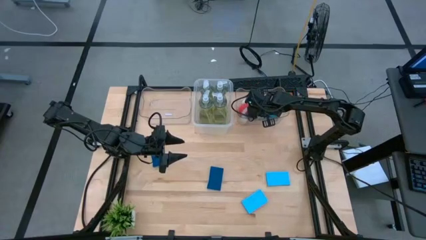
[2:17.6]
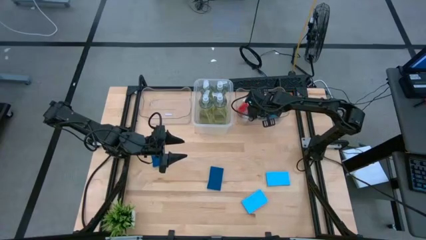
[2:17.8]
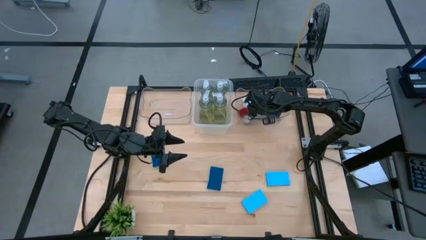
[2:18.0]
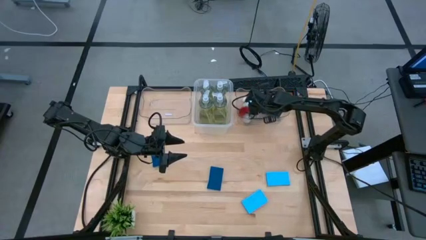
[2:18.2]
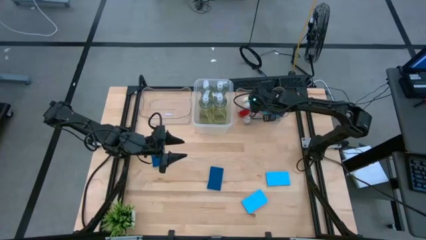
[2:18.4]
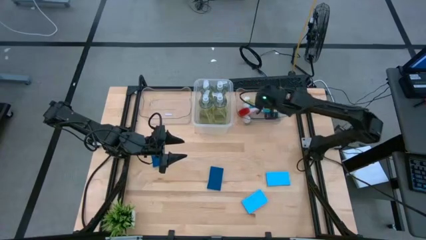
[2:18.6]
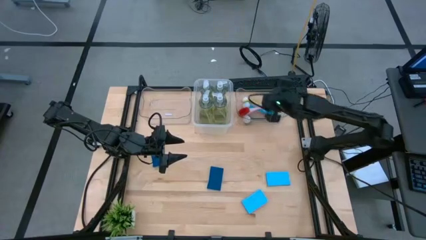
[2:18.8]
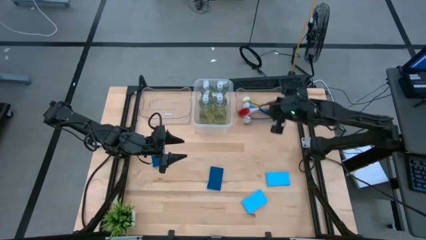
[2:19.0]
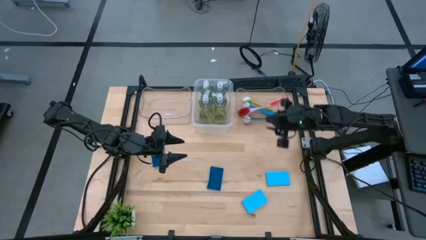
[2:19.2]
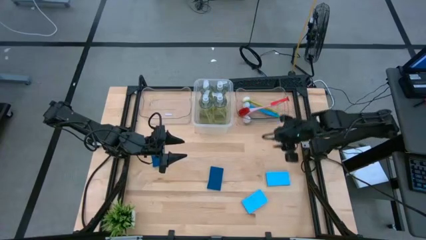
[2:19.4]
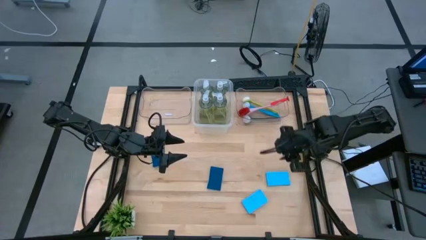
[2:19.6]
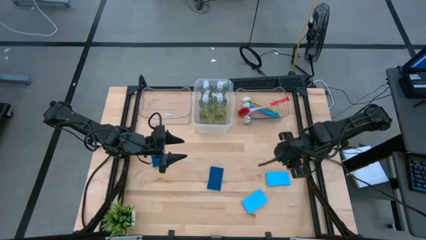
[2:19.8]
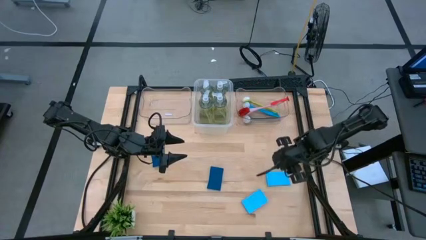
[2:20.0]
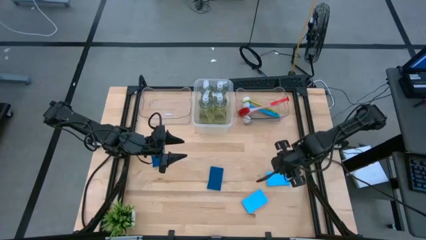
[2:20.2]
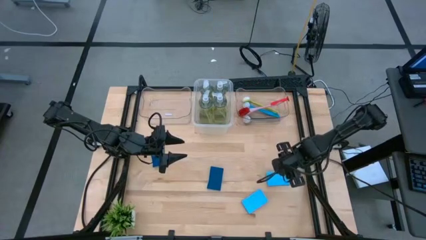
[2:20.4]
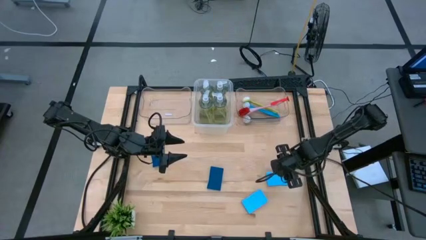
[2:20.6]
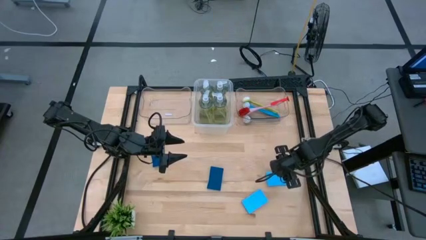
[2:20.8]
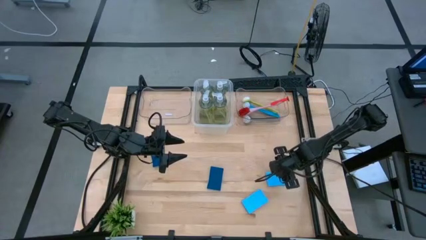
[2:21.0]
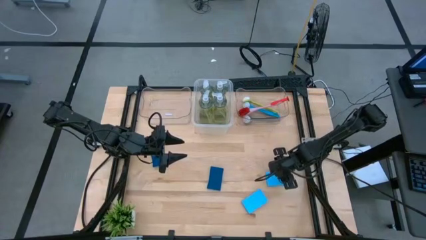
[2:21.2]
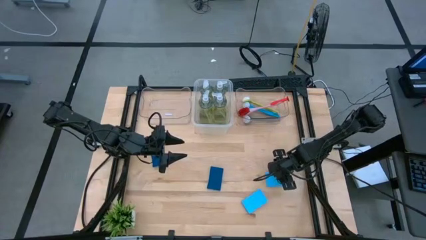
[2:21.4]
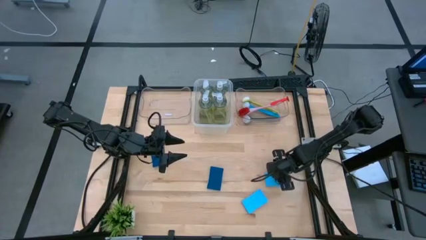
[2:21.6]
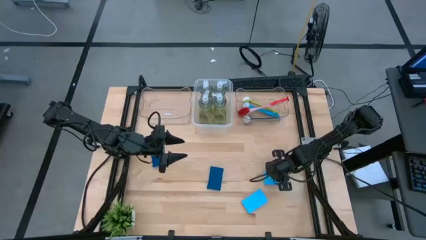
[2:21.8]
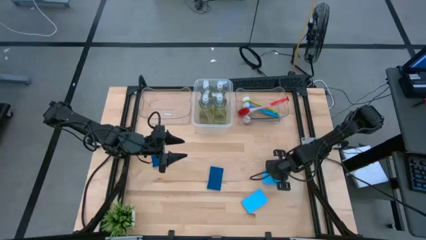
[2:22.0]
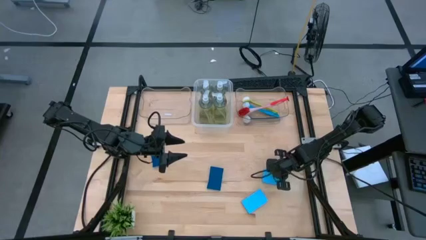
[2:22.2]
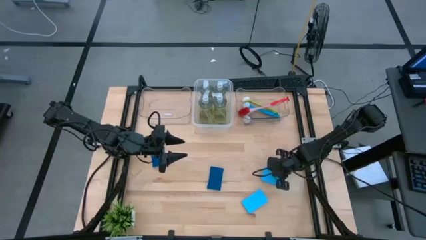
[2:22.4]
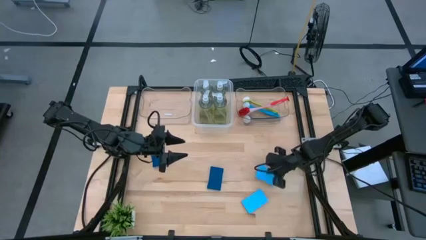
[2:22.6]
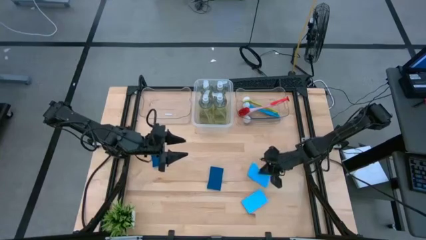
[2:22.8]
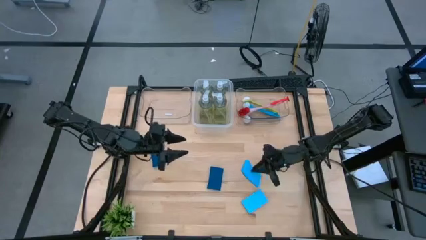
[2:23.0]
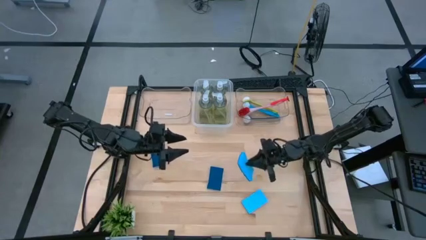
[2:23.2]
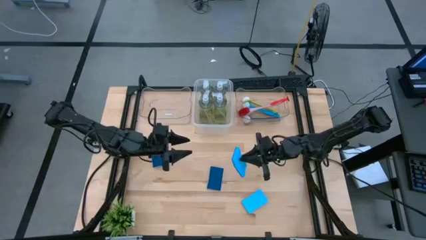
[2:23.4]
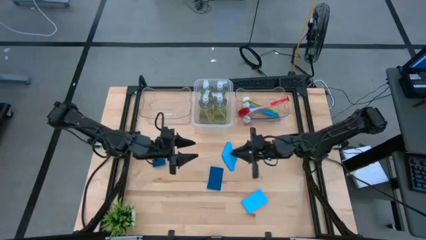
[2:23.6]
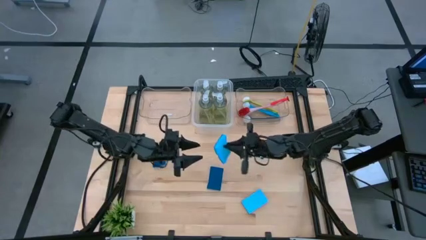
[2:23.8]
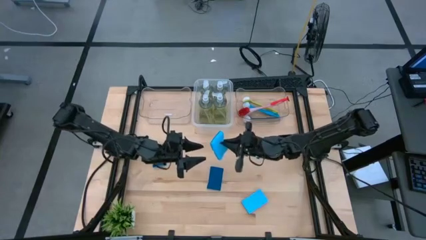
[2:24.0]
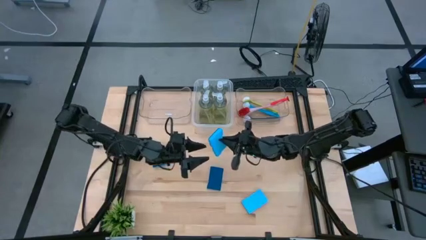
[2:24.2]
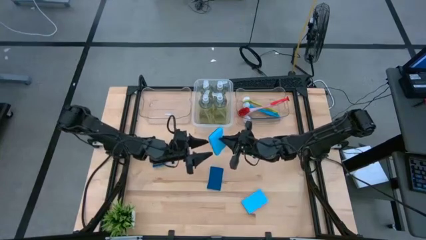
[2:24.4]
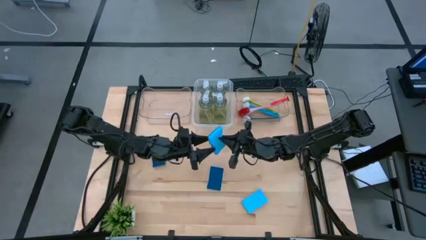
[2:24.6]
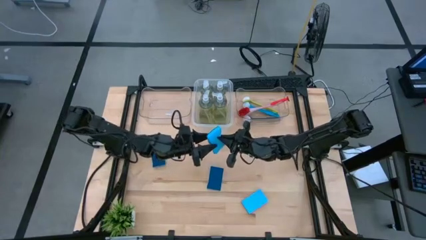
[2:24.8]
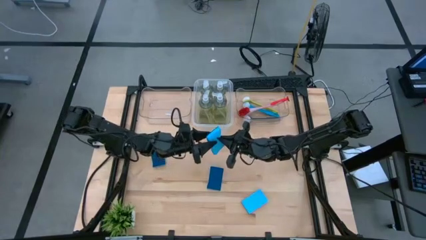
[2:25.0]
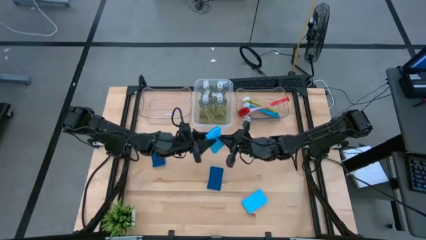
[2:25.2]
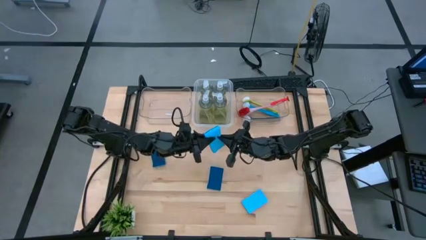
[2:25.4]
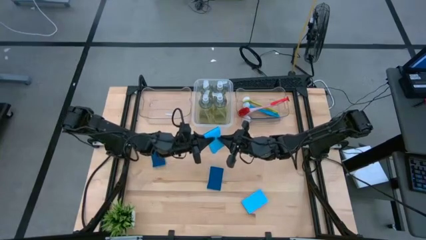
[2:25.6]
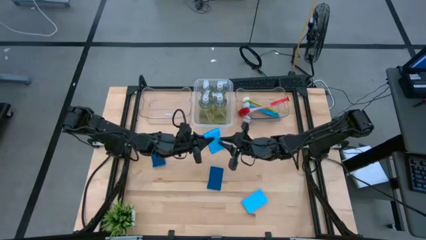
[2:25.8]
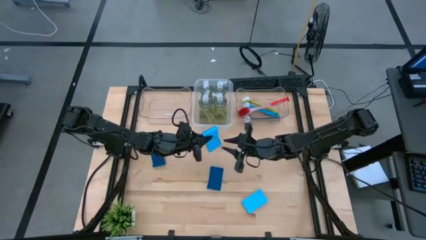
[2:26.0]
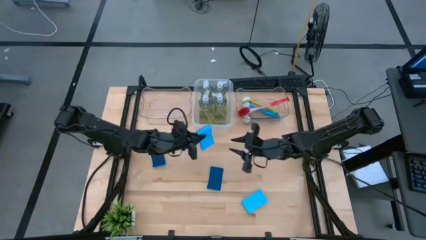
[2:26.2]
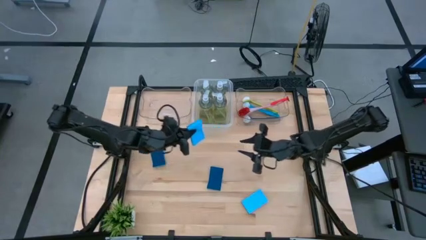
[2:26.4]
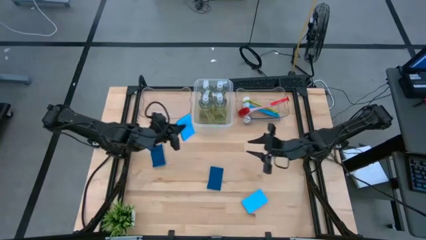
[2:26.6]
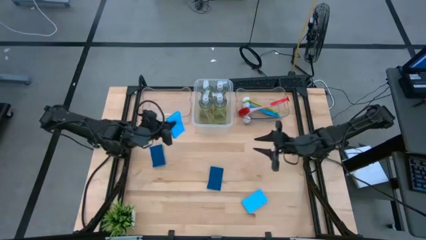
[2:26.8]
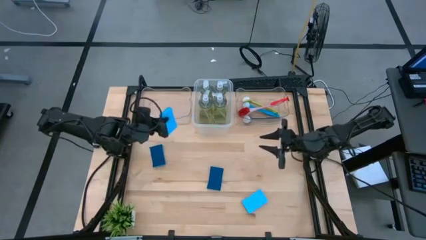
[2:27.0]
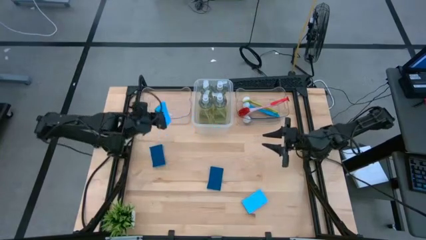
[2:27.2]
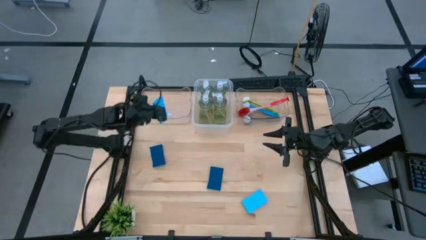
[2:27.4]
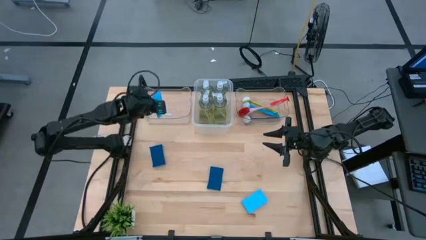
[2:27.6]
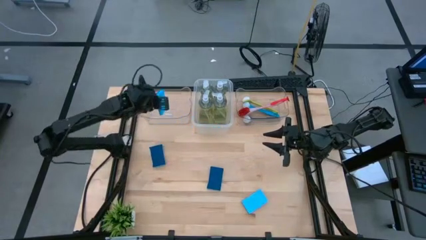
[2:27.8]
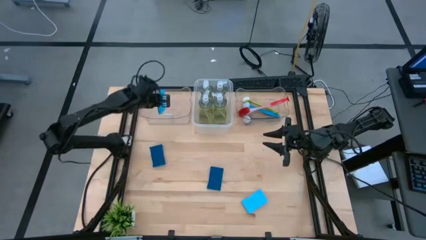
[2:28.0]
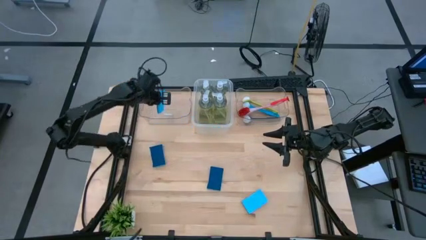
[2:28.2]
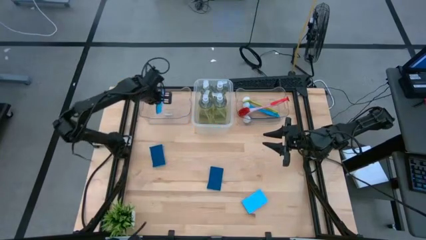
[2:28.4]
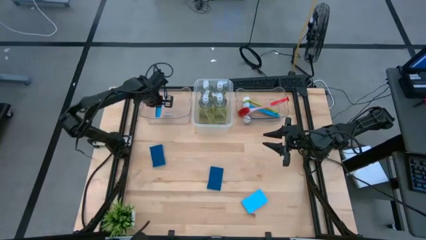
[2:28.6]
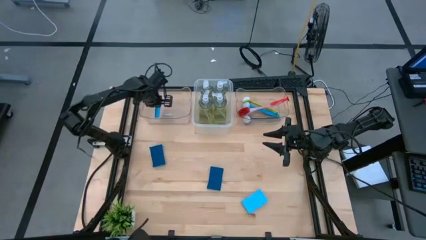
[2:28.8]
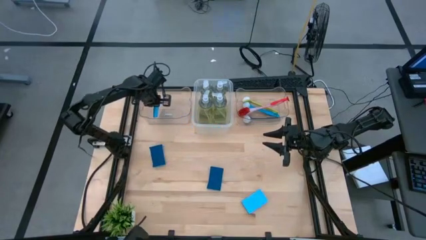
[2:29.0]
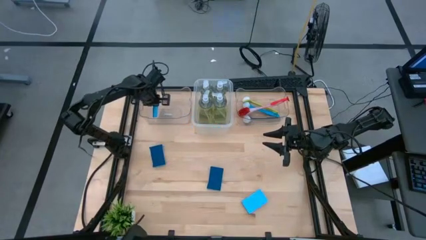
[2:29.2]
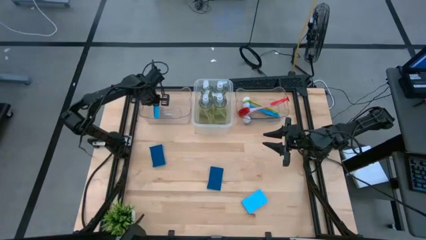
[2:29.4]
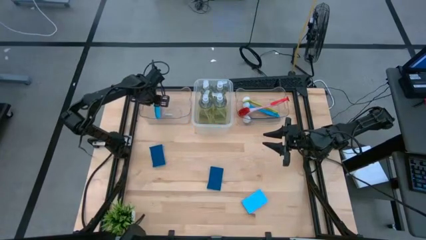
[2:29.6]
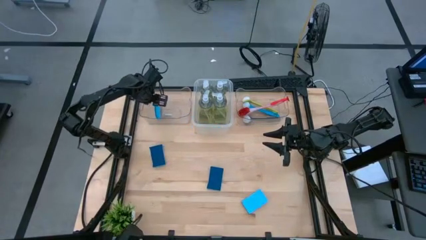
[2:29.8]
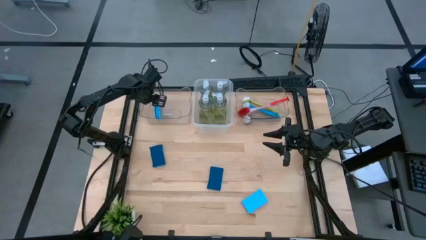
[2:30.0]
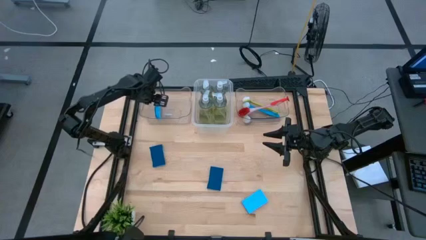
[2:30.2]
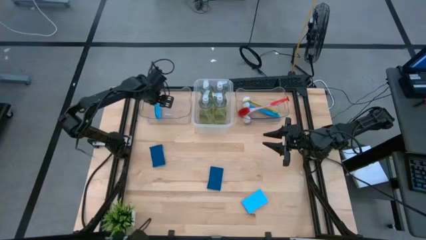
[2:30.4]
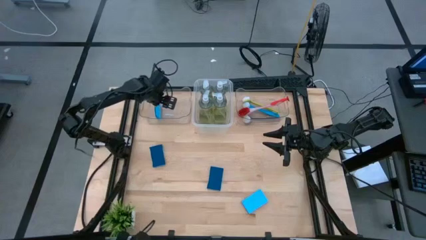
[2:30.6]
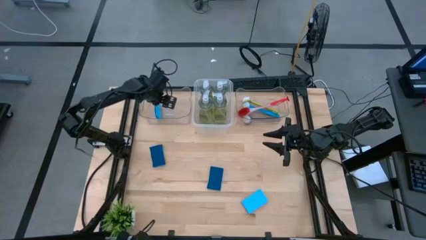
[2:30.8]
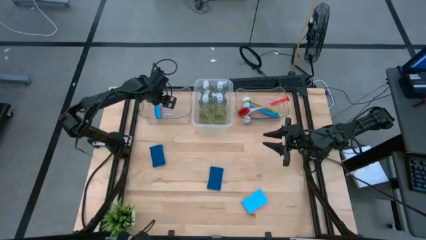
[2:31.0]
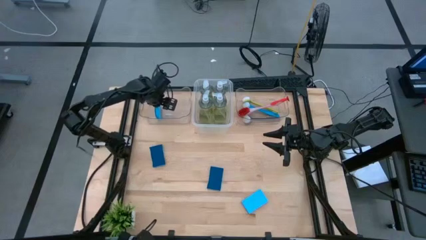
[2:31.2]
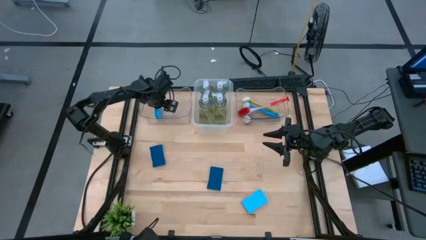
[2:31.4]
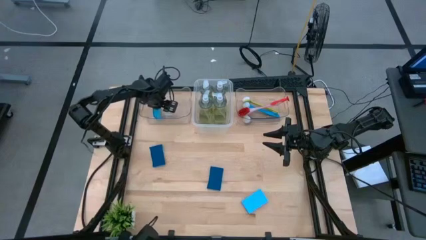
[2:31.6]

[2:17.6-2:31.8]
Task: Pick & Place Kitchen Sink Supplies
Put the blue sponge into the left transparent bin

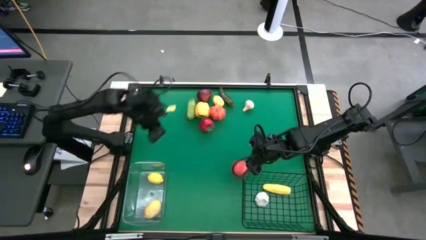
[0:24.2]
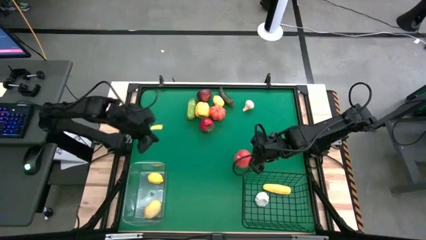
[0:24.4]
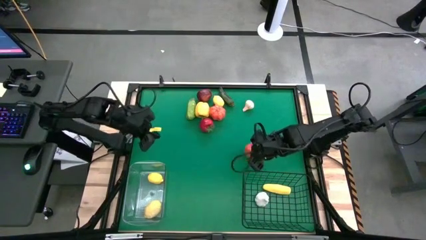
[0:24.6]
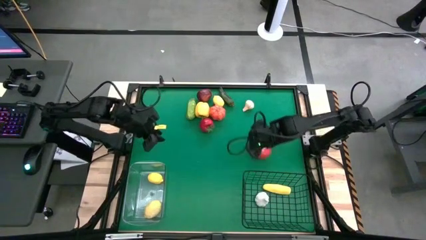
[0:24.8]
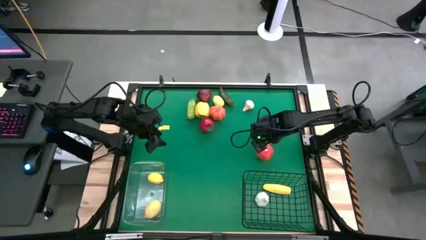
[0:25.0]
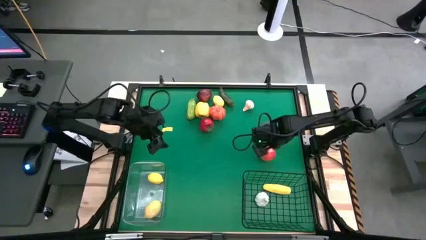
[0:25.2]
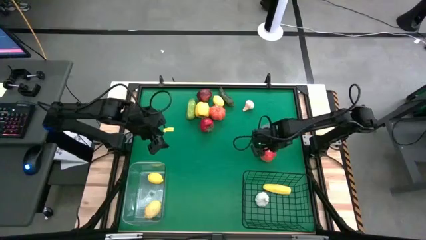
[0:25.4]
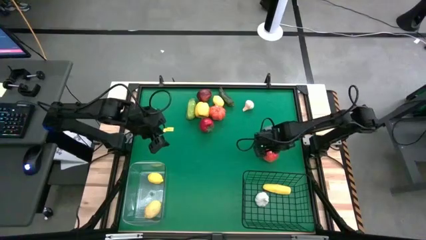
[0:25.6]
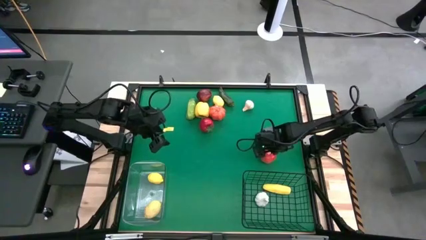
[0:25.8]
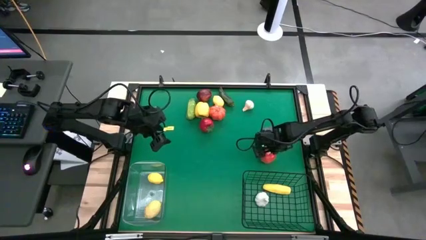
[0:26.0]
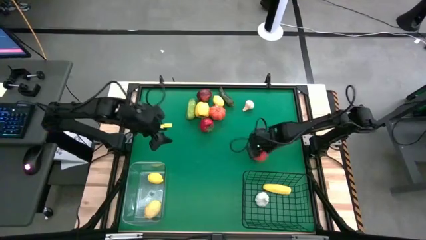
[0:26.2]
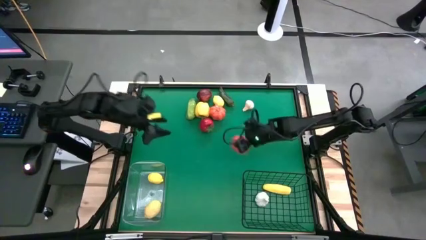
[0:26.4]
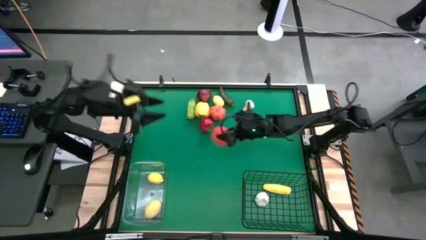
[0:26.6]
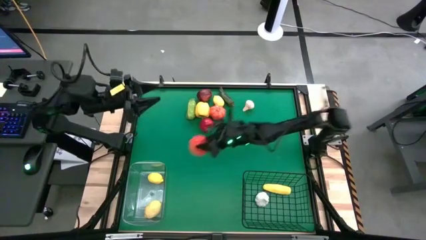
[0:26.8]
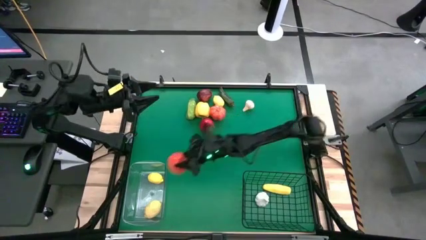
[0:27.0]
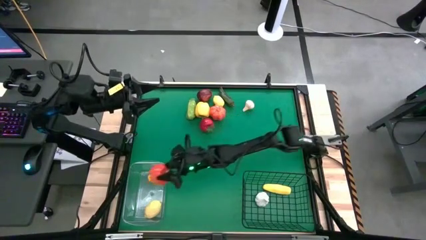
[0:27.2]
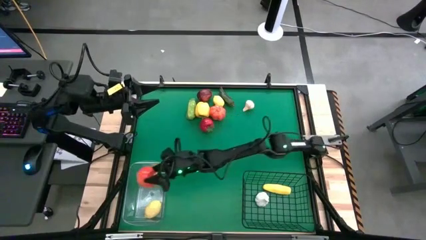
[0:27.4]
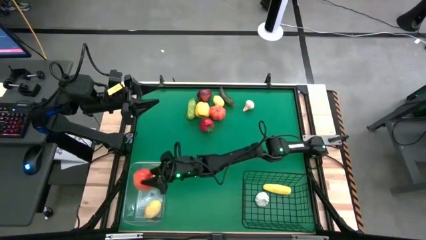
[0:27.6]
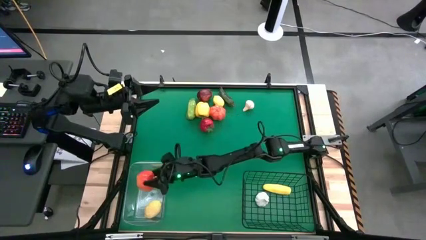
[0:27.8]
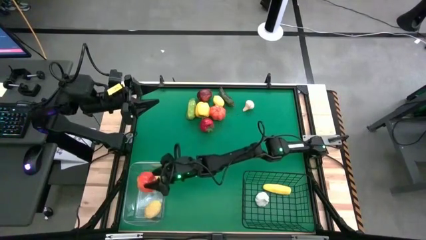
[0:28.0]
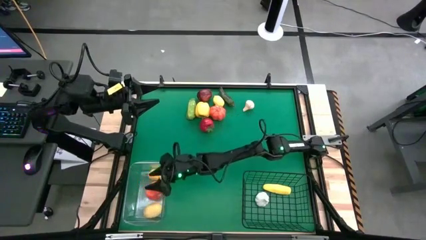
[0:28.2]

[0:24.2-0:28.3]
Task: Sort produce into baskets
Put the bottom apple into the transparent bin
